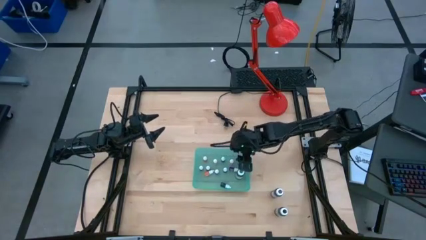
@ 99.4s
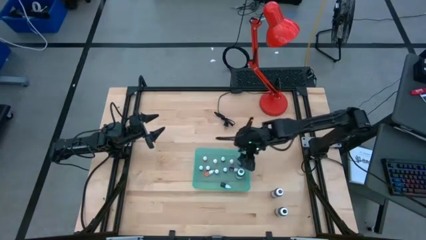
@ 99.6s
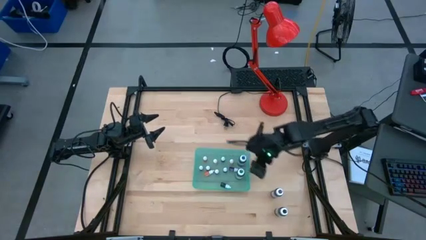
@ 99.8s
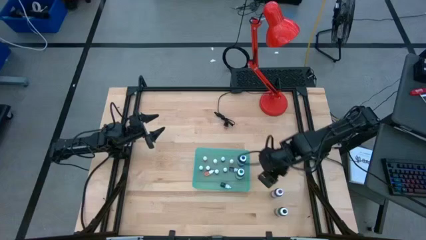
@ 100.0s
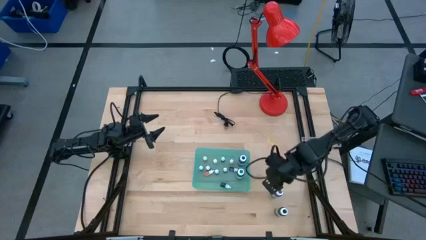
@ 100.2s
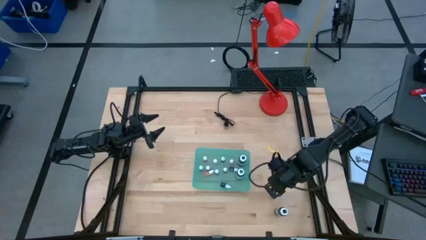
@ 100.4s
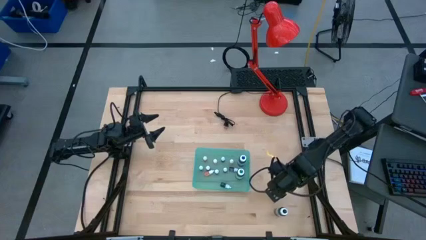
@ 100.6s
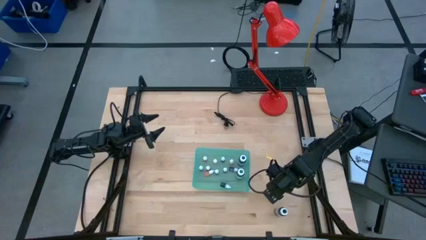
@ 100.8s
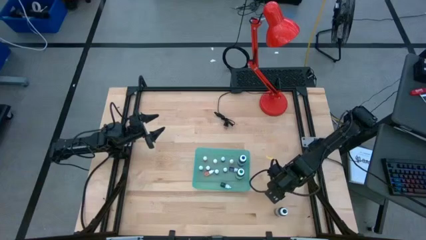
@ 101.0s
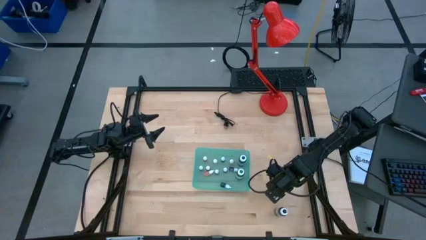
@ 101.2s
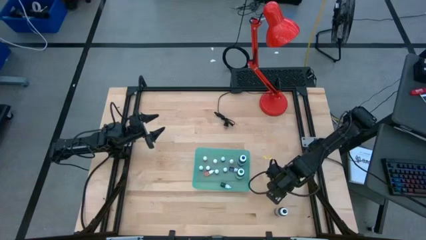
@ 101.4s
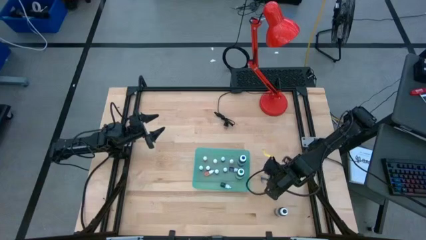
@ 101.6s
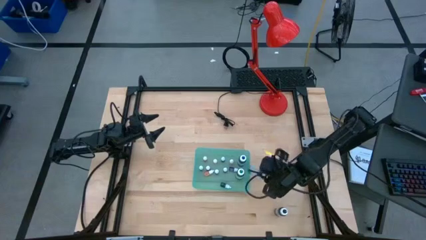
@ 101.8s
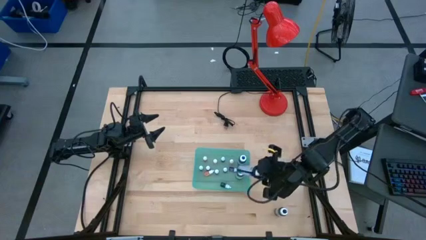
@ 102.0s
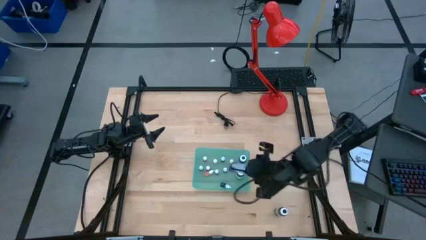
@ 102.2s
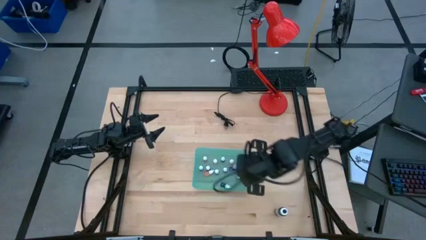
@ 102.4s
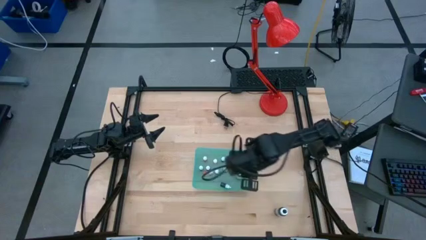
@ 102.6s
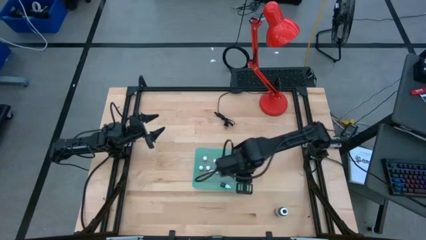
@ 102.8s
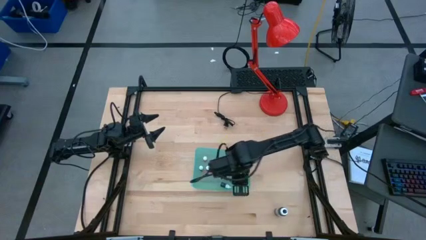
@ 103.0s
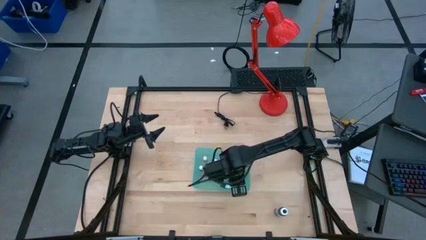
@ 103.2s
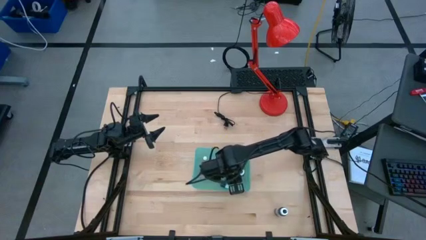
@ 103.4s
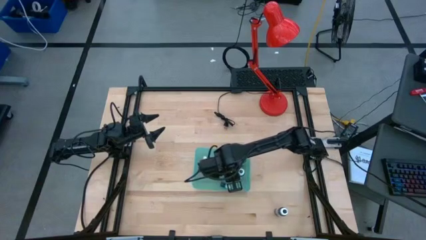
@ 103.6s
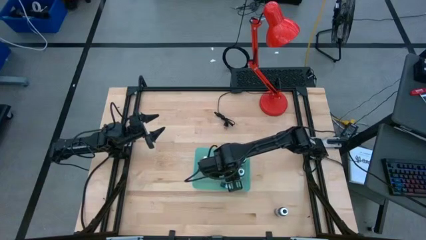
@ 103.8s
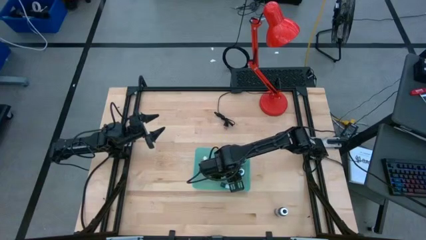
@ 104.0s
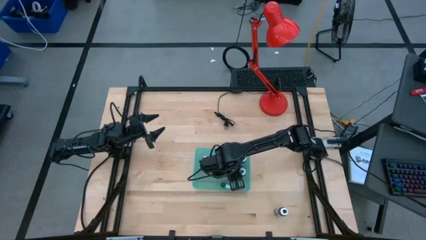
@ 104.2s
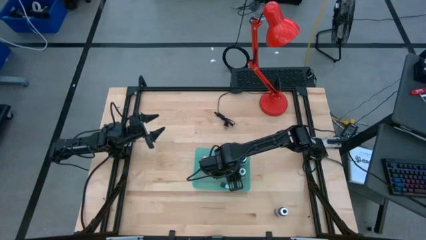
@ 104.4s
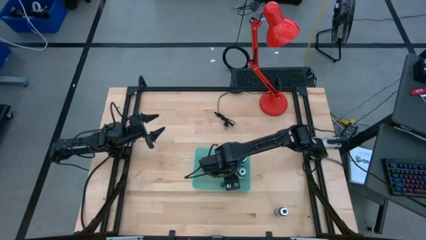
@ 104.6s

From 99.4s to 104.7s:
Task: Pick & Place food coloring
Put the big purple food coloring bottle into the light blue bin

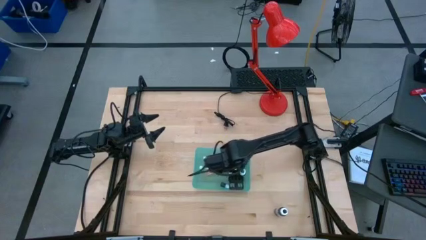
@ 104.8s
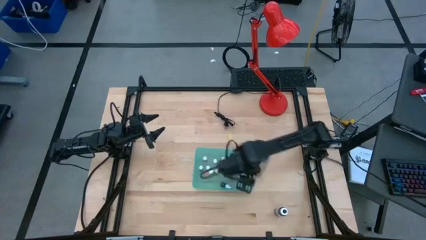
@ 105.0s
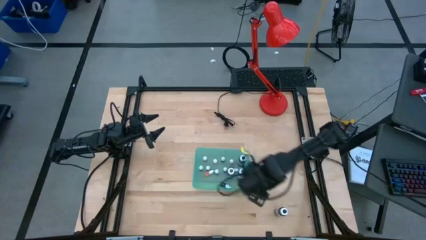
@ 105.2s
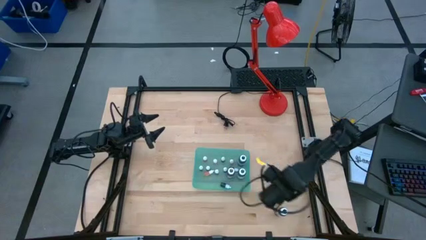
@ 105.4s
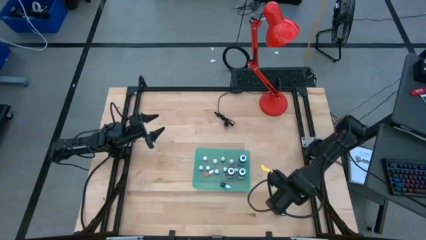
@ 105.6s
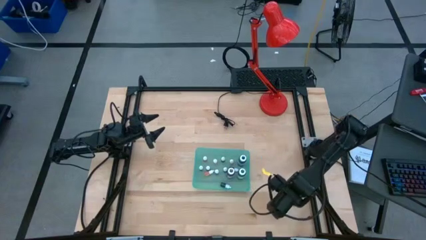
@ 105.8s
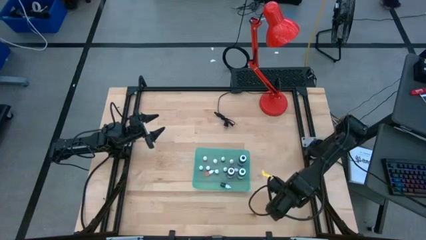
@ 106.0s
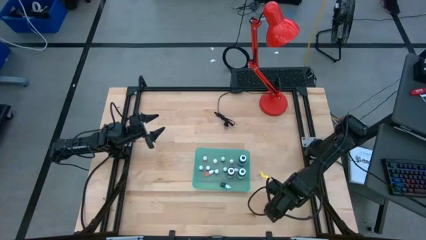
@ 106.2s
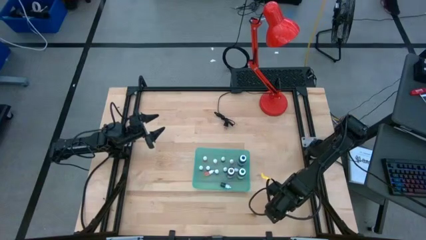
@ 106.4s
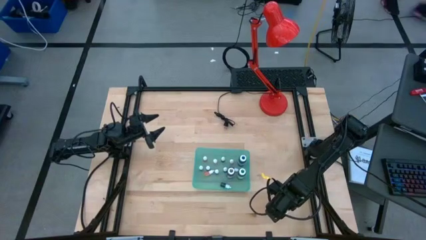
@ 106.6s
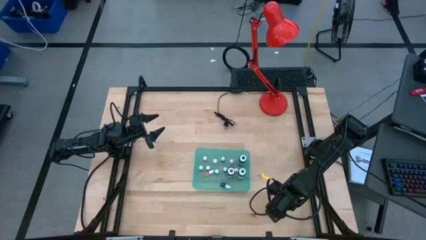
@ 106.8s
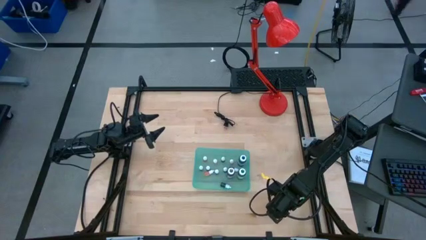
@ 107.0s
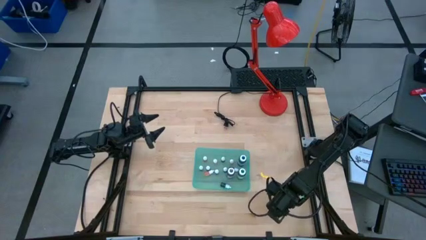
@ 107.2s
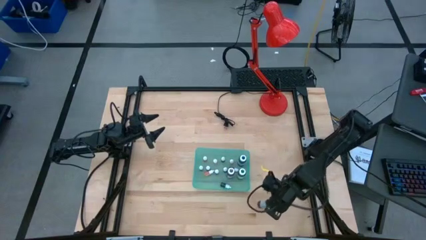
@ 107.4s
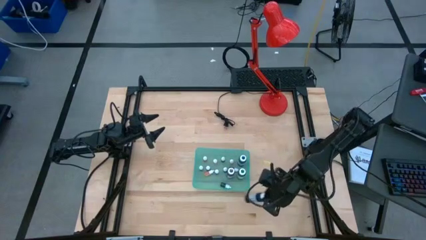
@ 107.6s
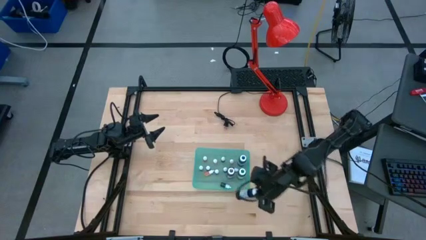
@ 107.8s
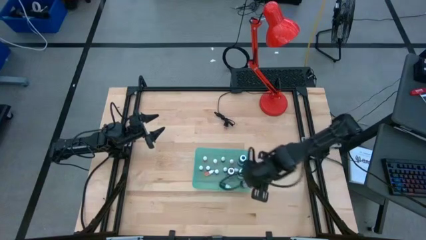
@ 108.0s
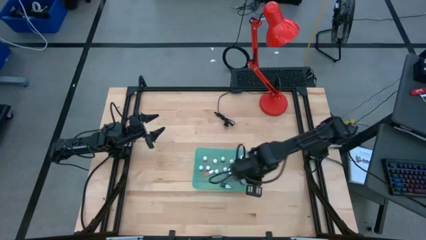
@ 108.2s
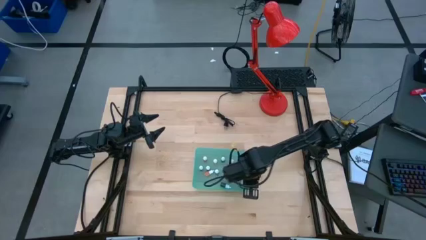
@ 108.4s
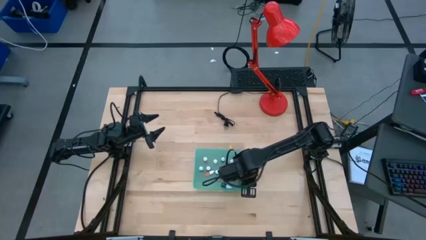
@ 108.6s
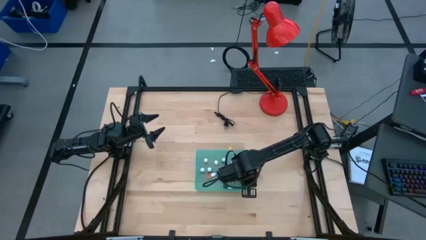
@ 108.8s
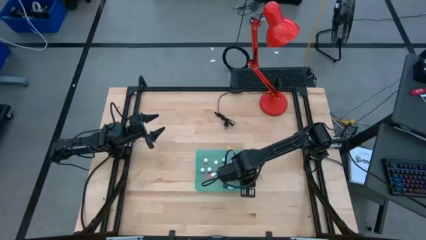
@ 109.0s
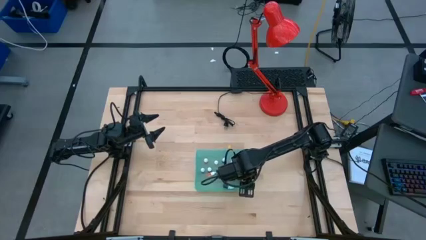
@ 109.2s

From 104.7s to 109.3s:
Put the big black food coloring bottle into the light blue bin

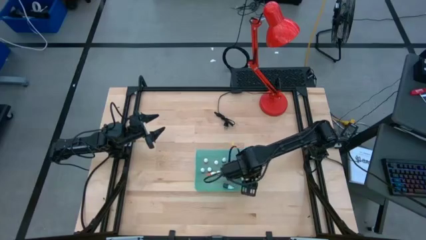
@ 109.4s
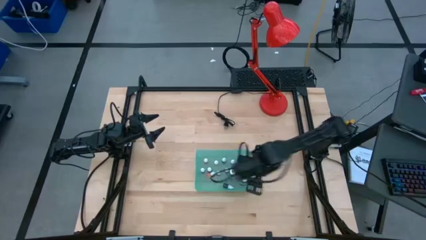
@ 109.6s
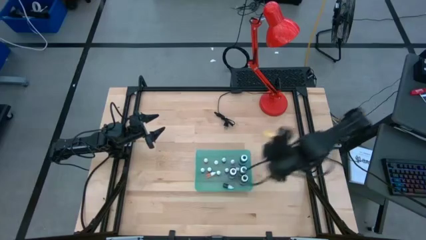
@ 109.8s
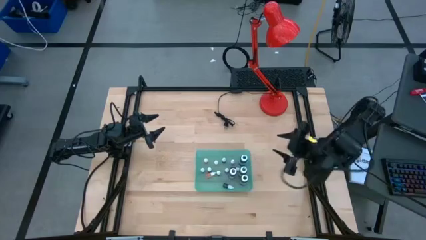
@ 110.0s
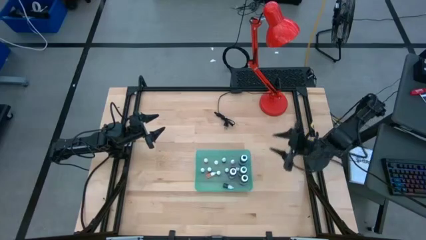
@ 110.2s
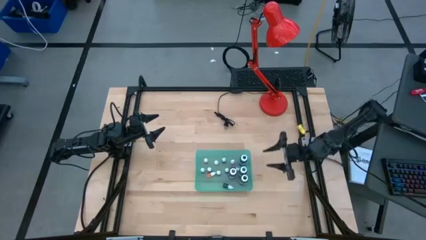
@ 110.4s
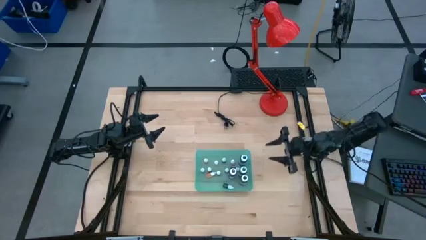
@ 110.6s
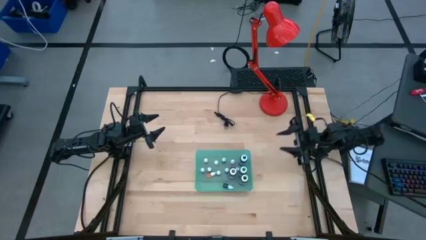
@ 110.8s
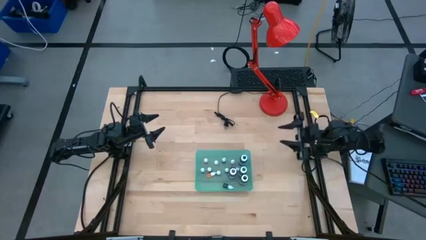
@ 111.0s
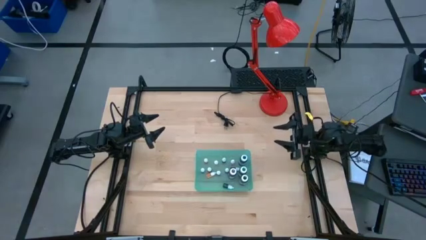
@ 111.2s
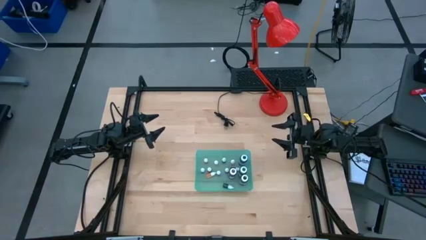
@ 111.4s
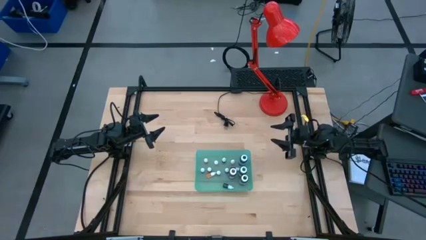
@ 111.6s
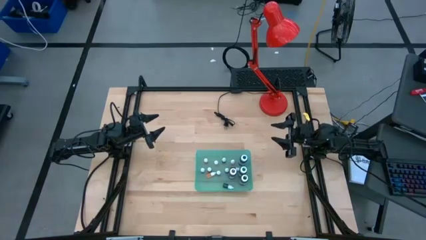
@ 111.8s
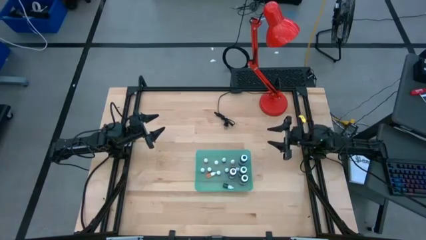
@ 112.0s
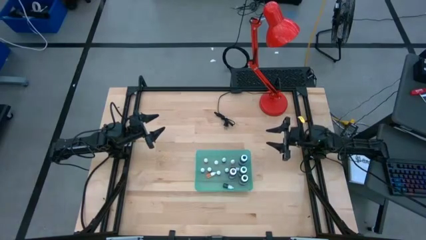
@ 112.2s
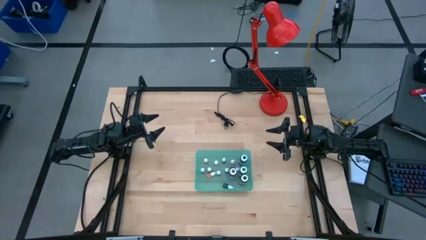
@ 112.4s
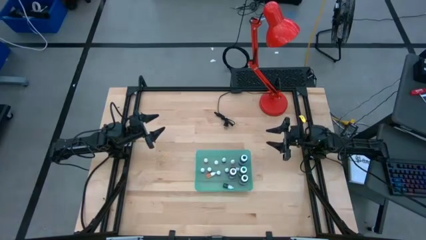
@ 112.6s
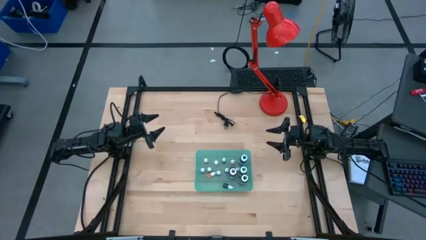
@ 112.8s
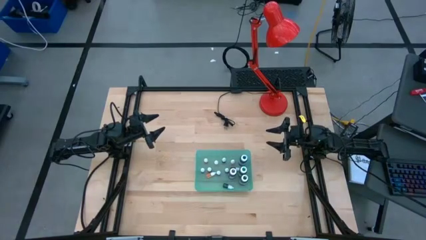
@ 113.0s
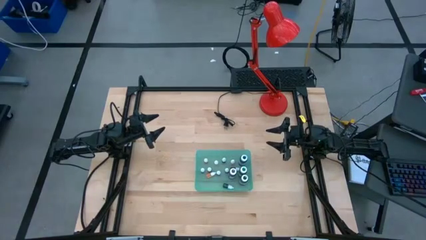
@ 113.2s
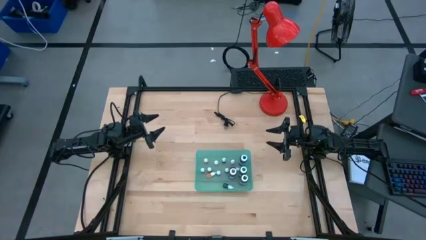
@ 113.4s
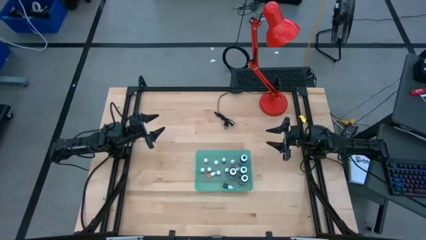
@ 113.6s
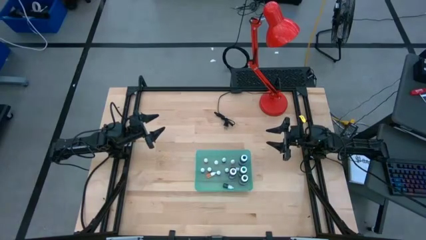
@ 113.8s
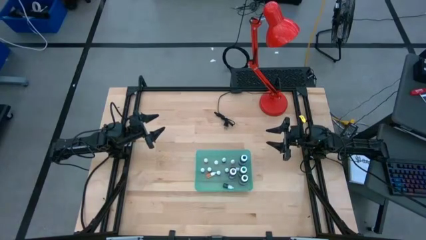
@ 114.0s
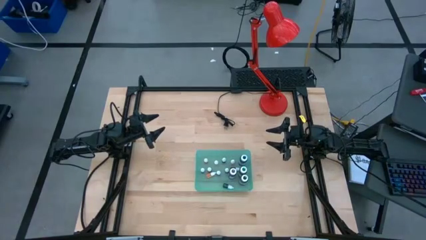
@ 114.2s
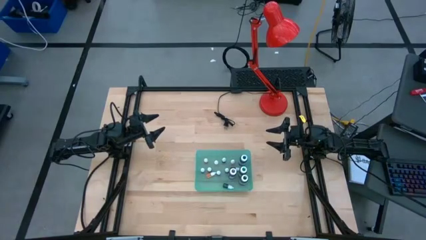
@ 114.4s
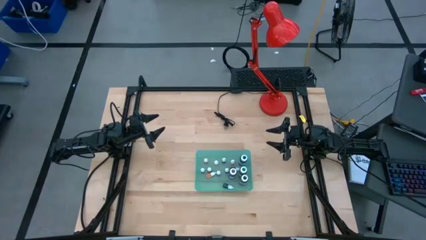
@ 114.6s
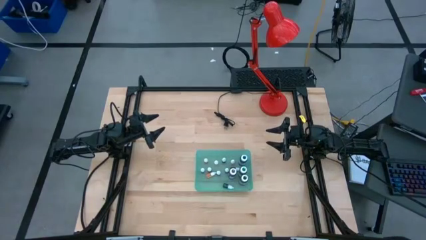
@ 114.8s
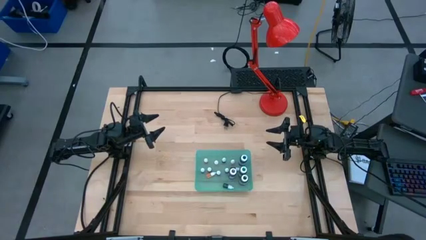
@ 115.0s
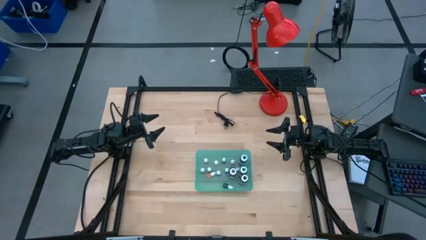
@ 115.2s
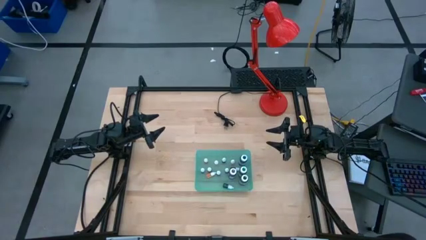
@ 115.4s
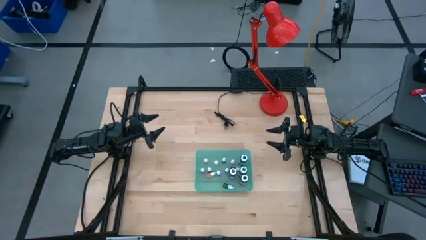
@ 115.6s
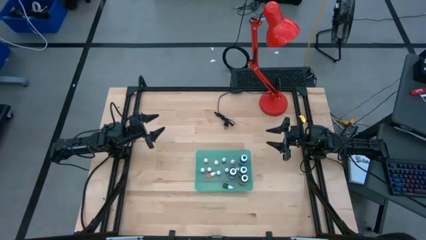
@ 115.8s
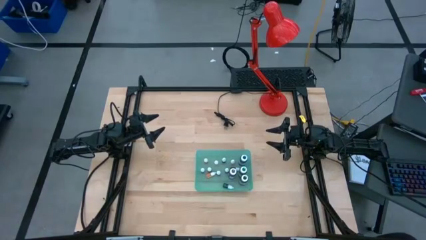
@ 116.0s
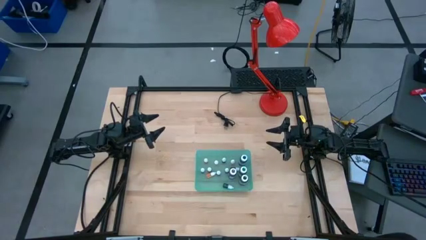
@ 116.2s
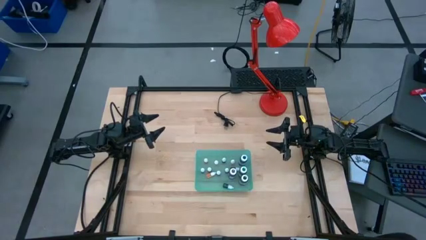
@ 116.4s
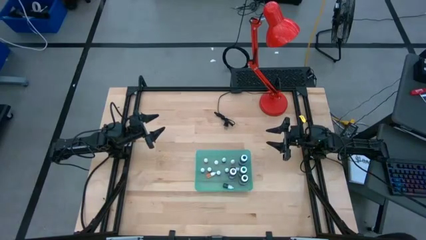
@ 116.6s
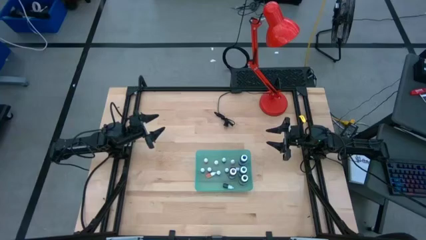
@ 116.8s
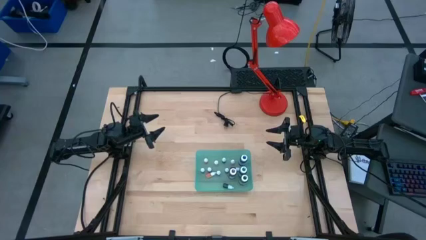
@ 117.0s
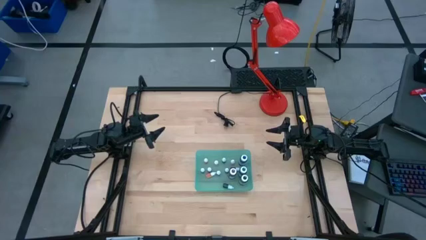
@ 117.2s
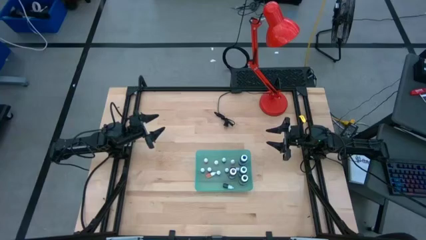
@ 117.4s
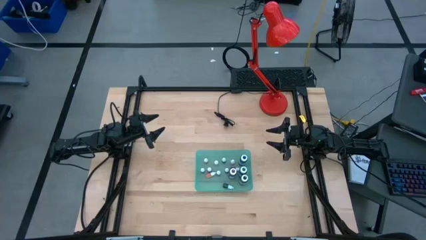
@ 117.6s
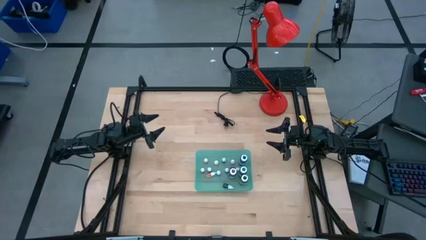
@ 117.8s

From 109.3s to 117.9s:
Return to Home Position
